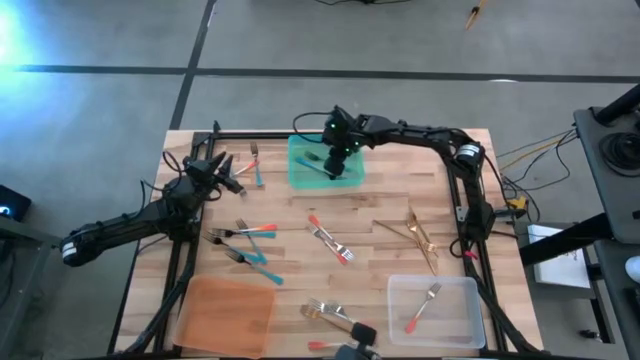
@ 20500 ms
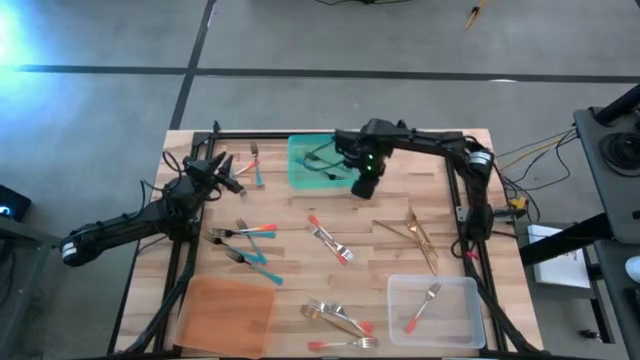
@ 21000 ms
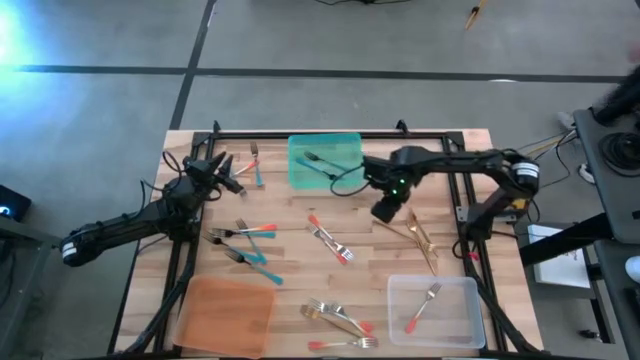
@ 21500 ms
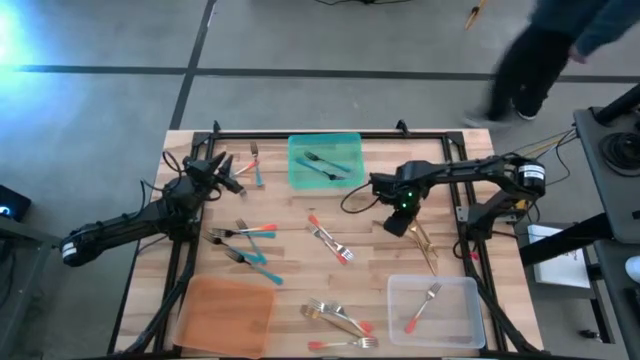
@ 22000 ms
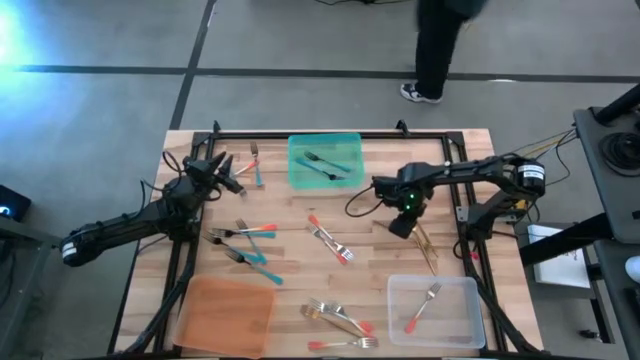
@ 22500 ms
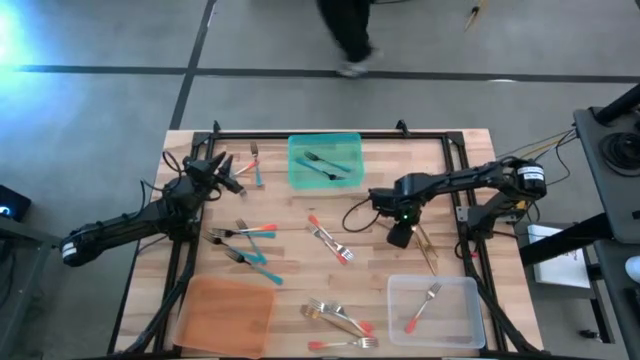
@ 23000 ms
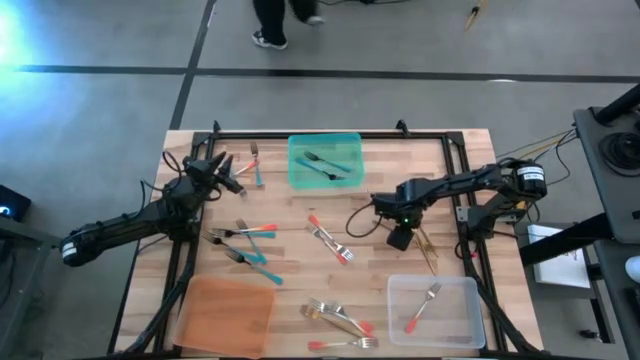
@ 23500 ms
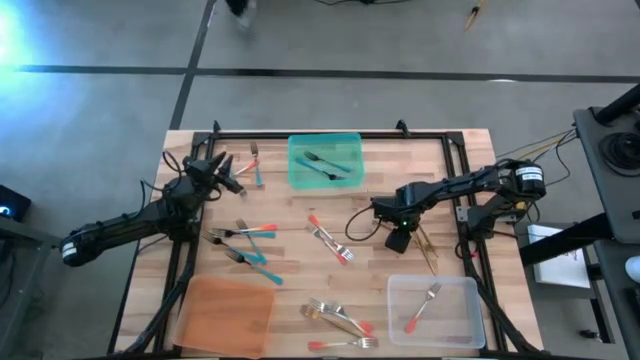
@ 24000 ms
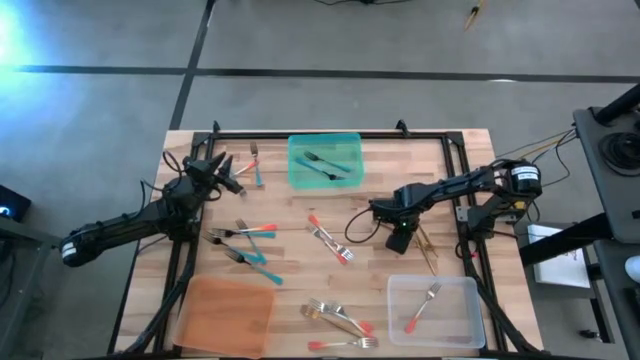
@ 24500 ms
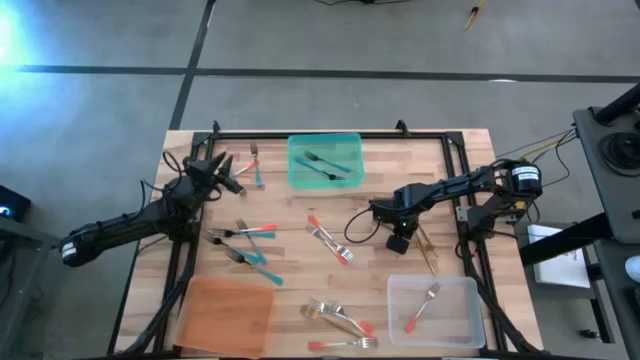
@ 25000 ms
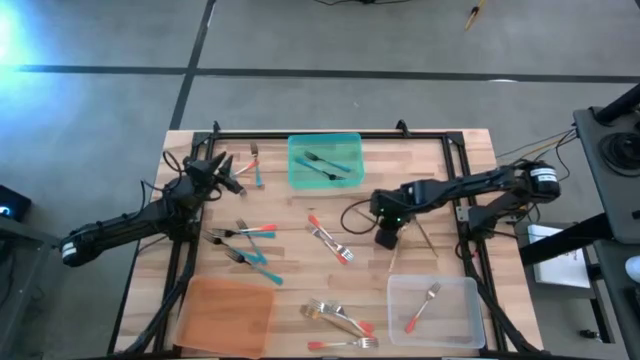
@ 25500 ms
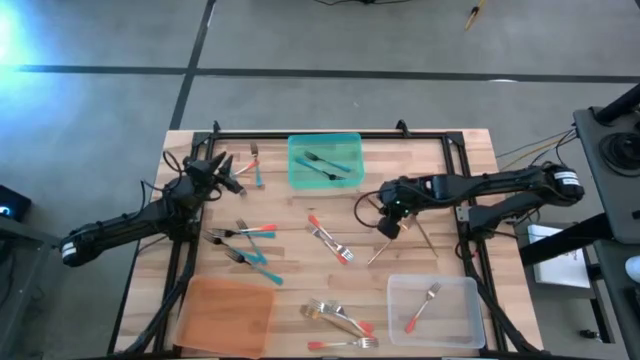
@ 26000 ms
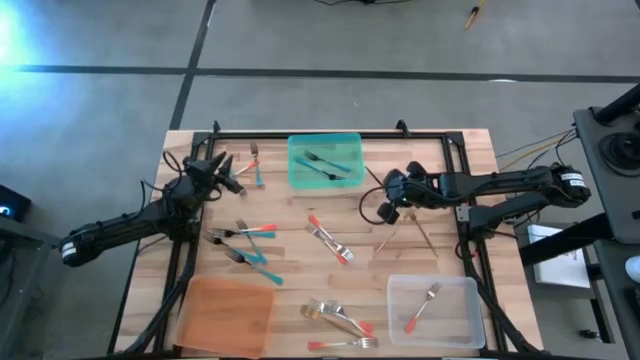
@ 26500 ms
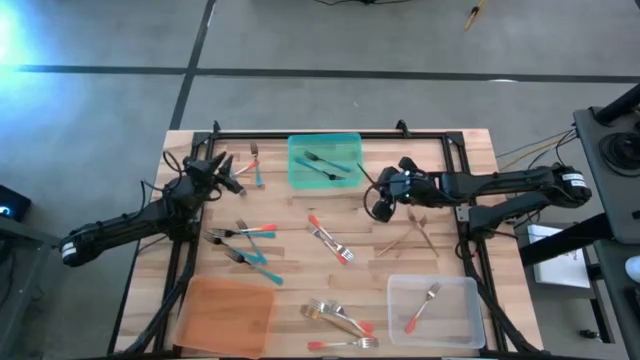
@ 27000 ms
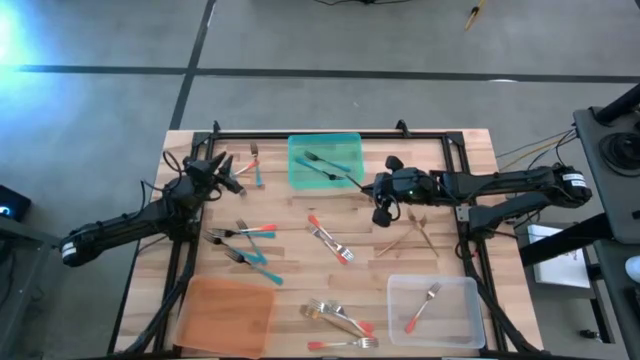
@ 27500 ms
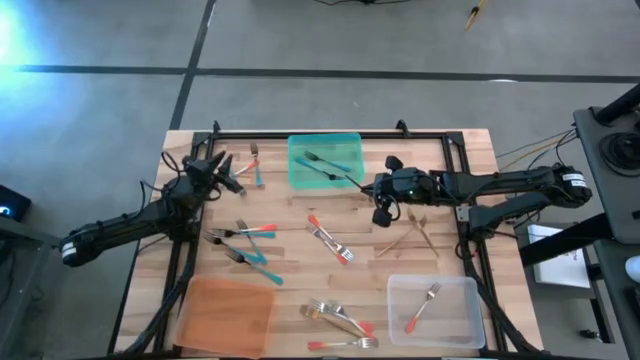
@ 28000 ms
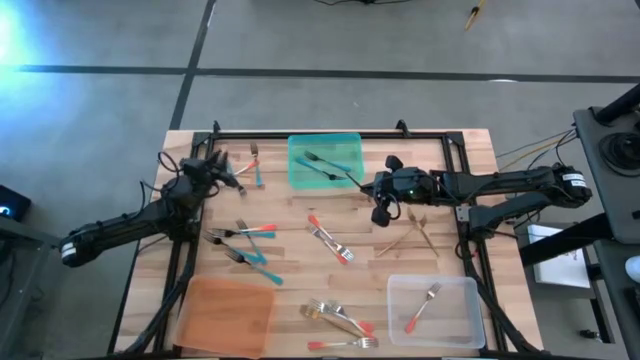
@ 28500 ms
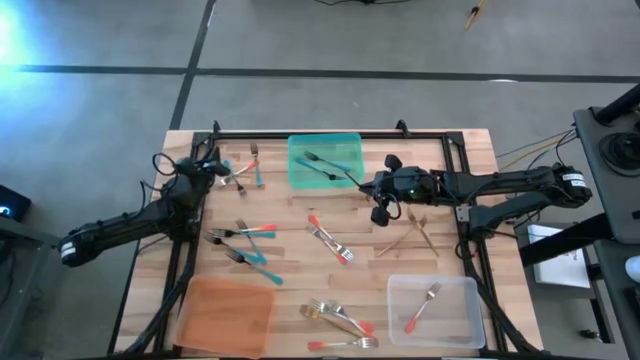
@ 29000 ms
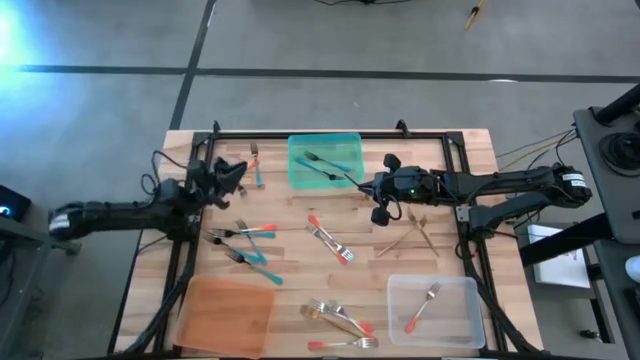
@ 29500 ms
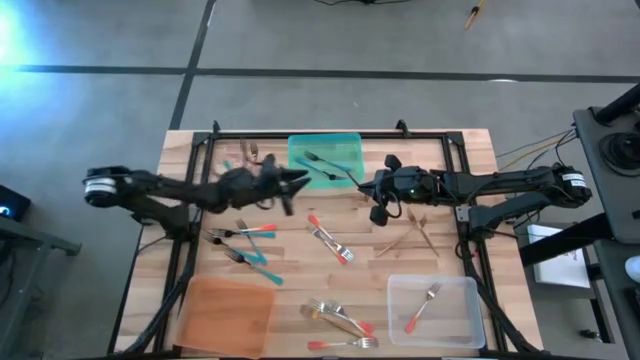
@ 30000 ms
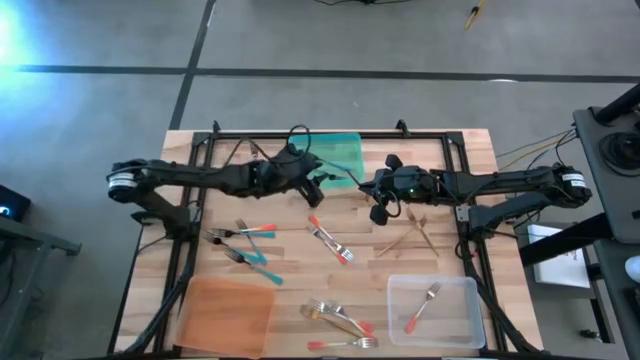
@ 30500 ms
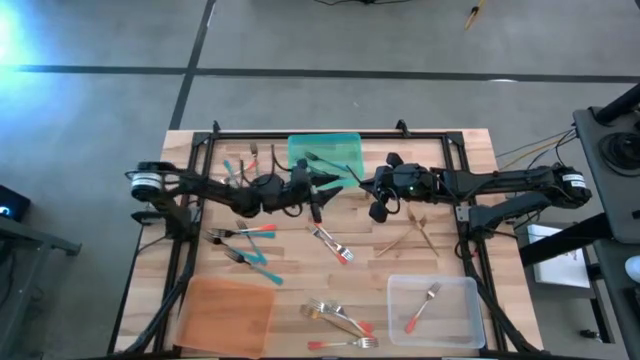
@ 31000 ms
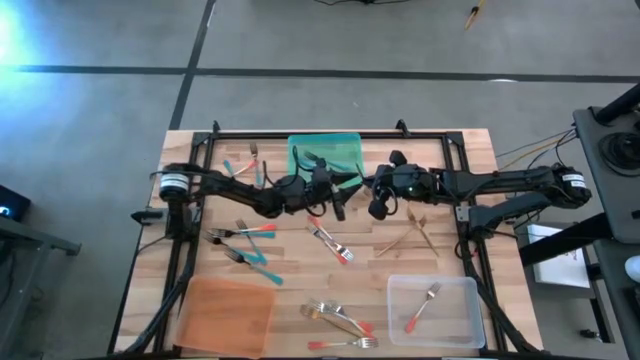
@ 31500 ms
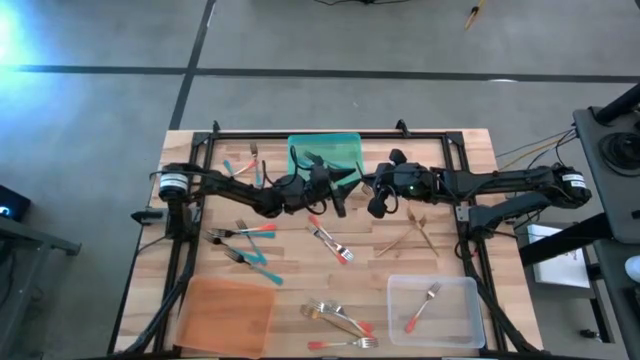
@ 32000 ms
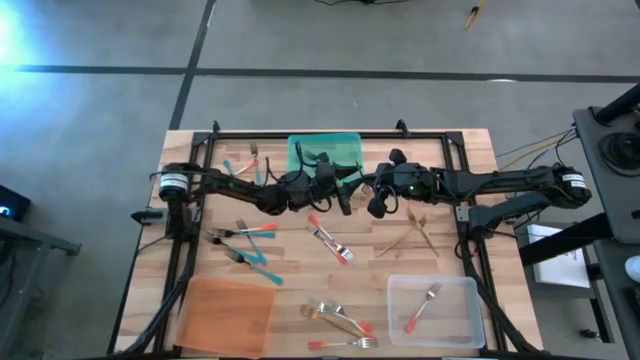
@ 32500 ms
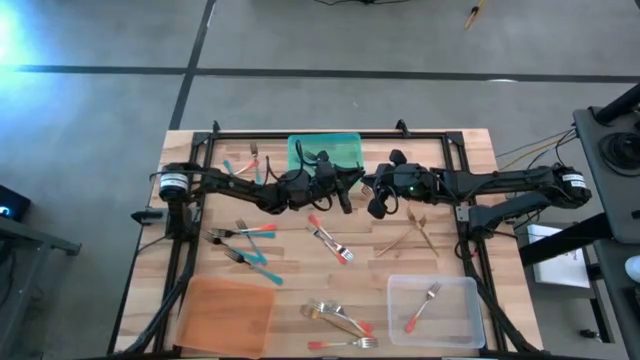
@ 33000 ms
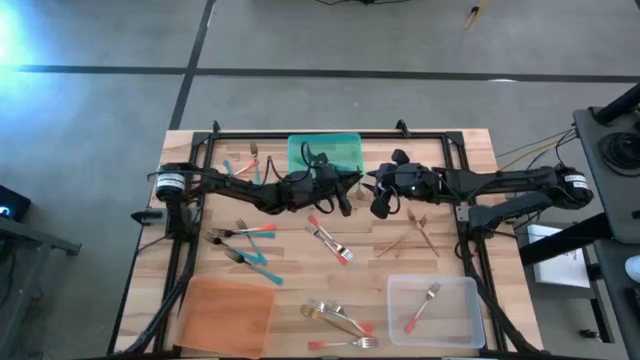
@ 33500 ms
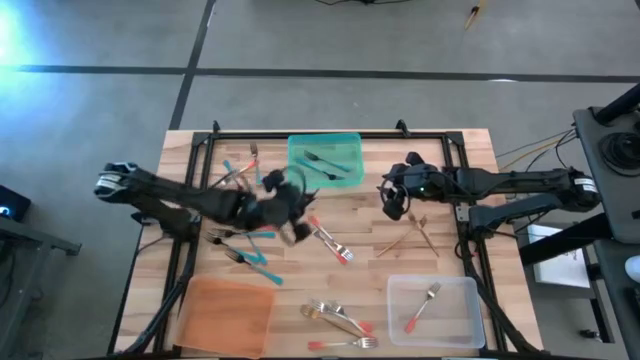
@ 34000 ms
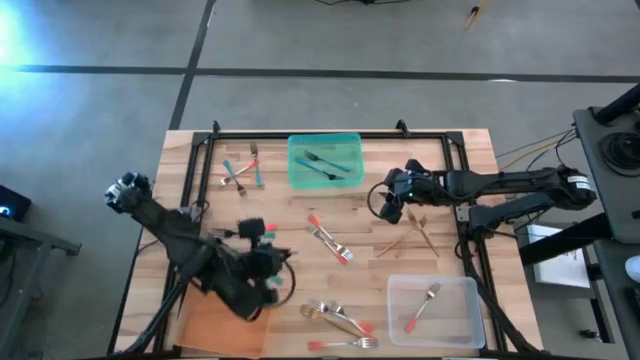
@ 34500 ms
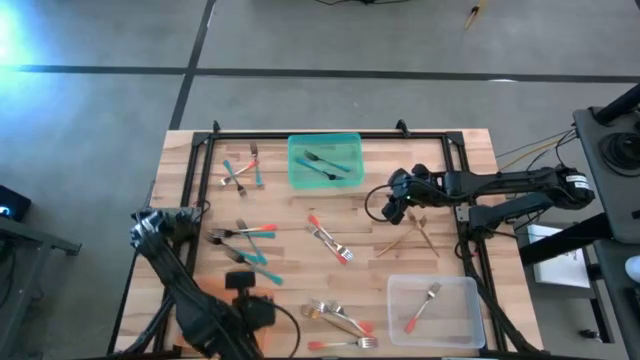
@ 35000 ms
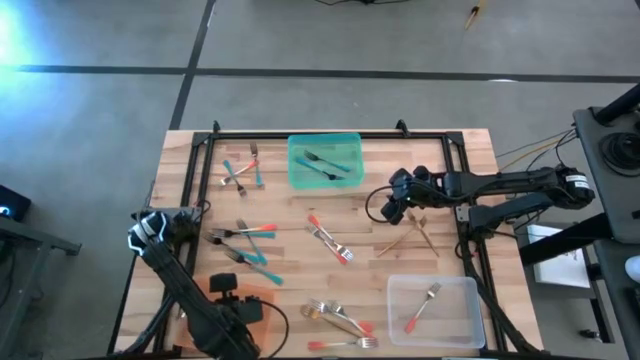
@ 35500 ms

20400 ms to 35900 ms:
Task: Sort silverware by color (type)
Put the gold fork into the orange bin

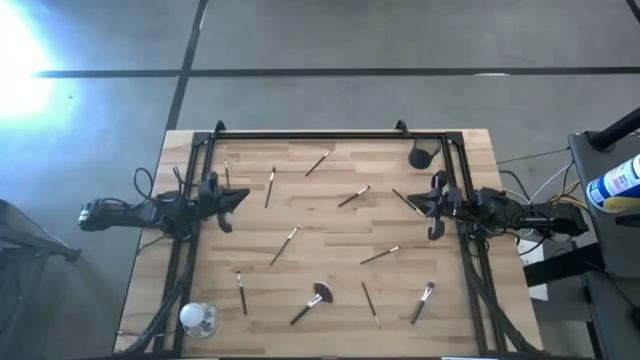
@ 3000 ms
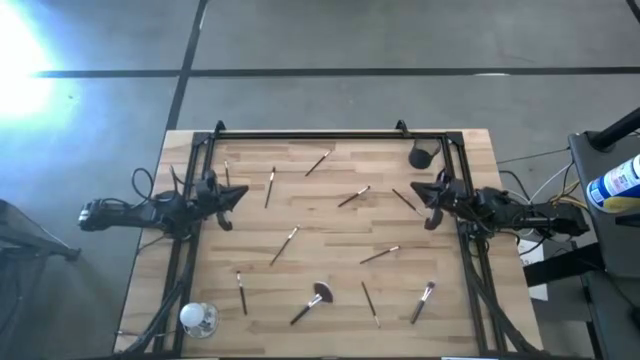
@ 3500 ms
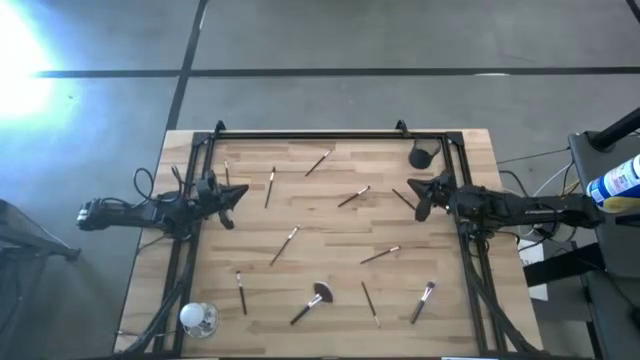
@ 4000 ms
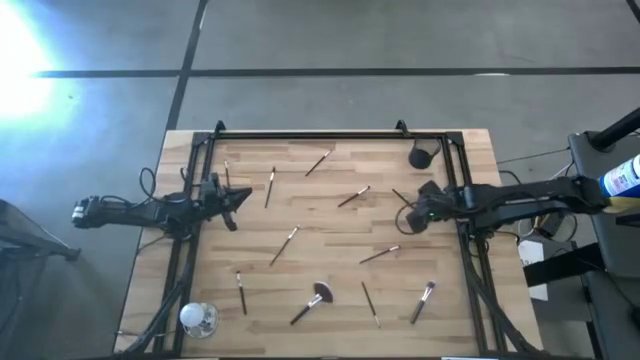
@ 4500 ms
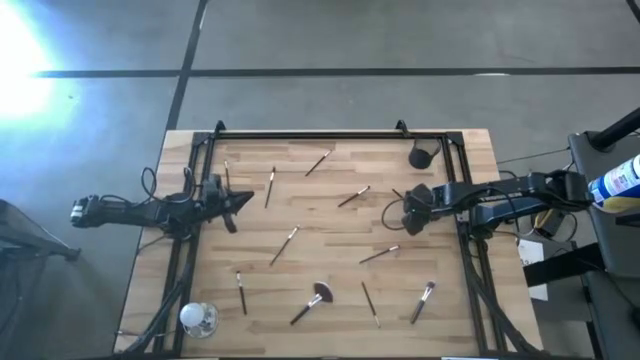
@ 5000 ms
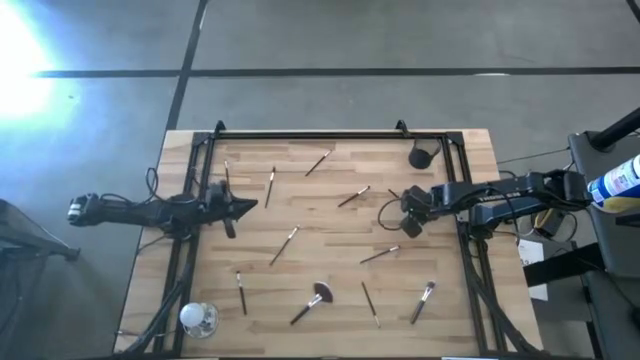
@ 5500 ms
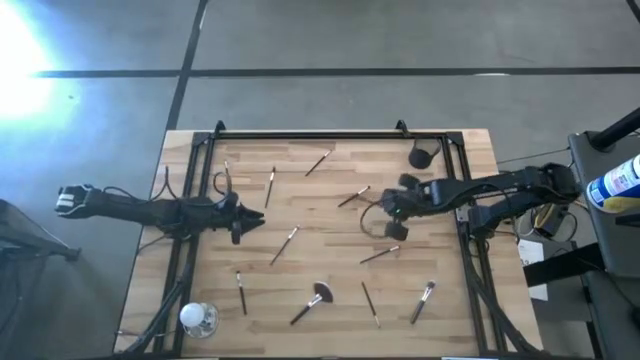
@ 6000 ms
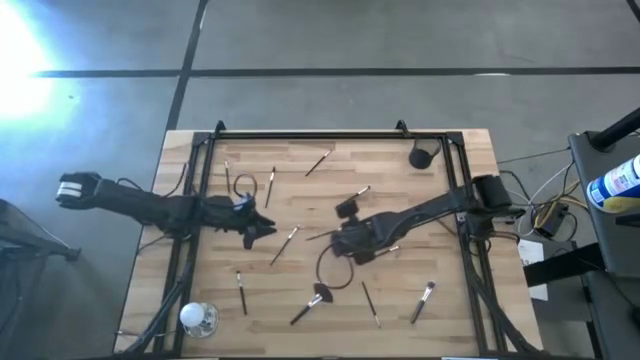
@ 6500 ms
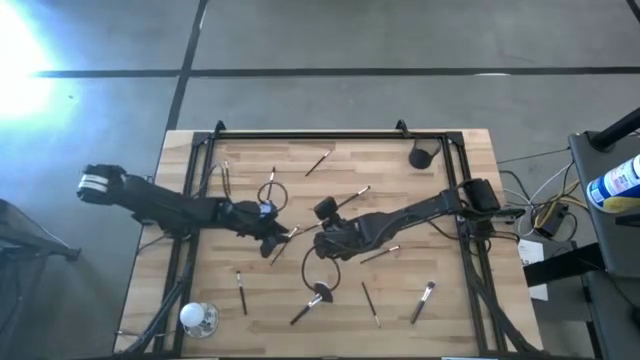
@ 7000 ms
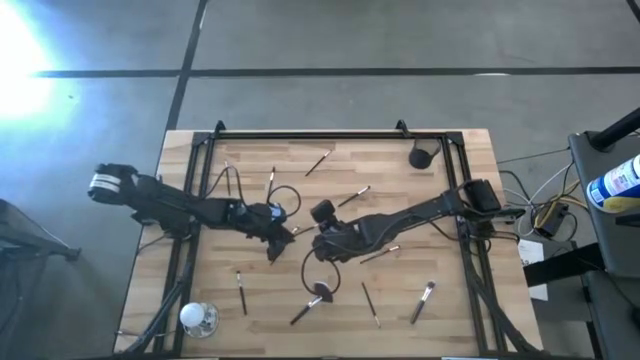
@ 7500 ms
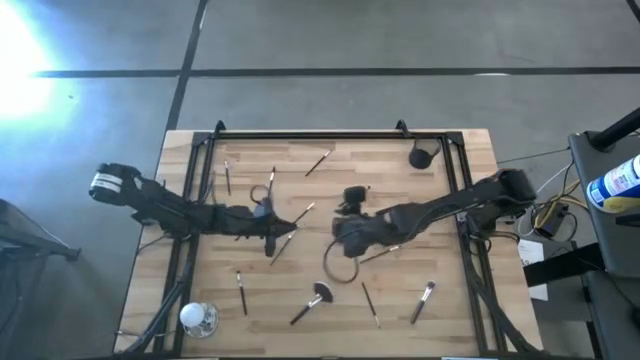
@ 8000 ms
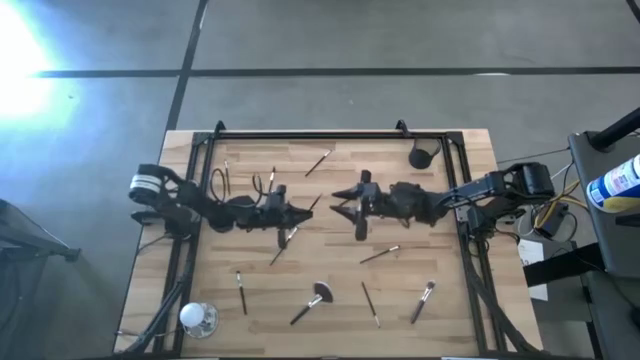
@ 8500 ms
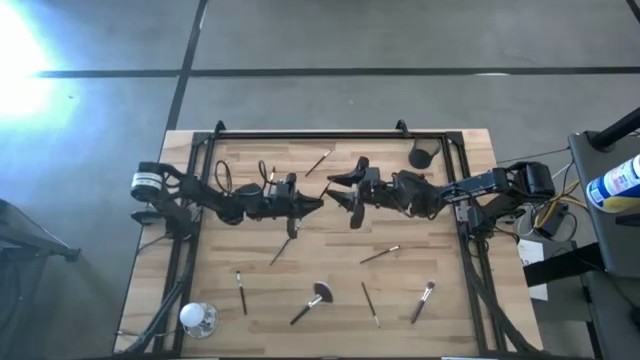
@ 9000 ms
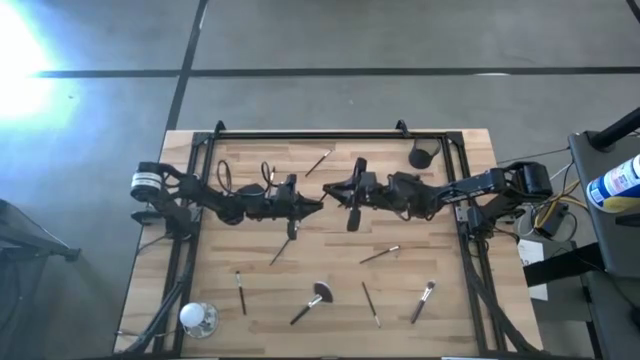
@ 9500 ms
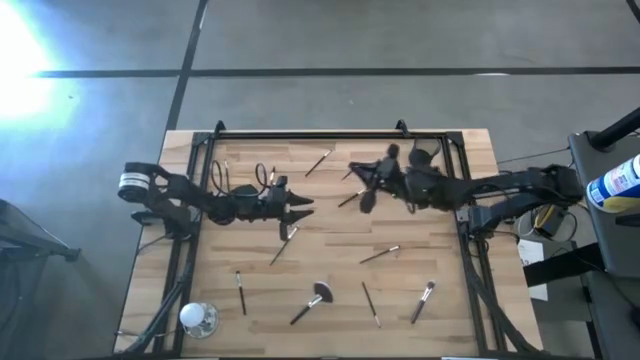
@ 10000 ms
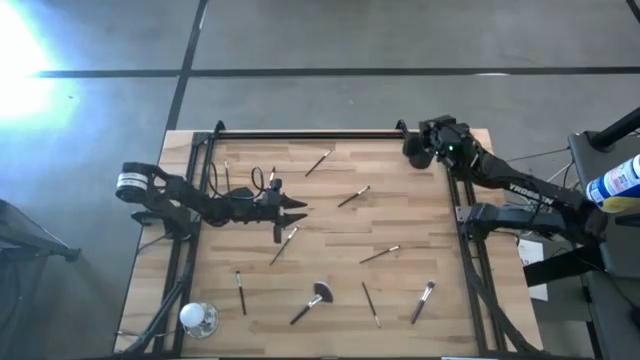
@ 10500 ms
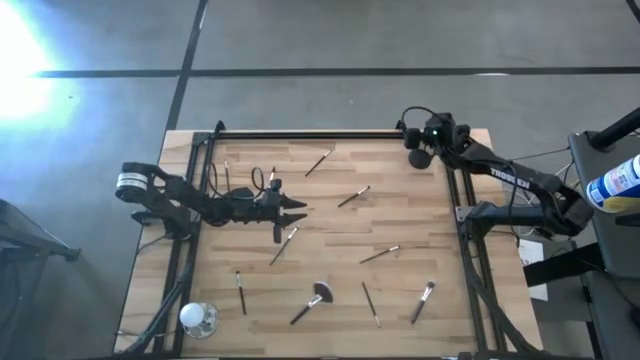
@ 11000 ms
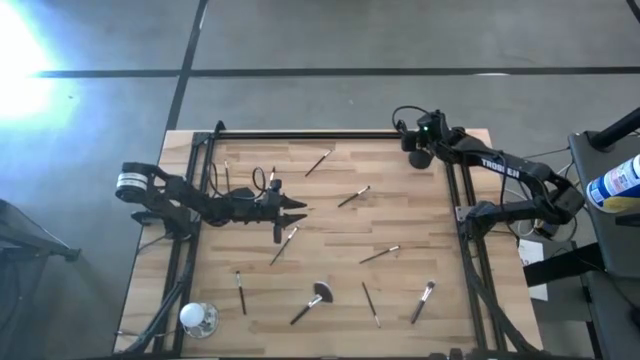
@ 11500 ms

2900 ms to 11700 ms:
Task: Put items in baskets/containers
Put the liner brush into the pen holder
